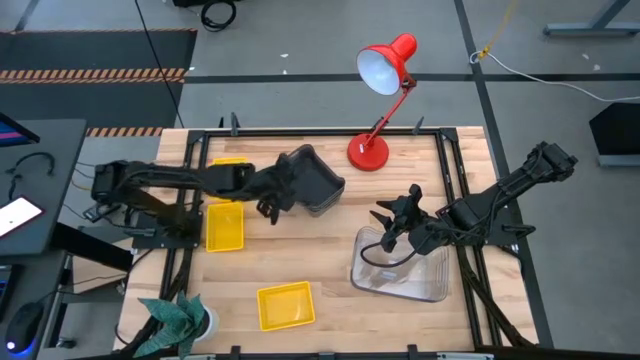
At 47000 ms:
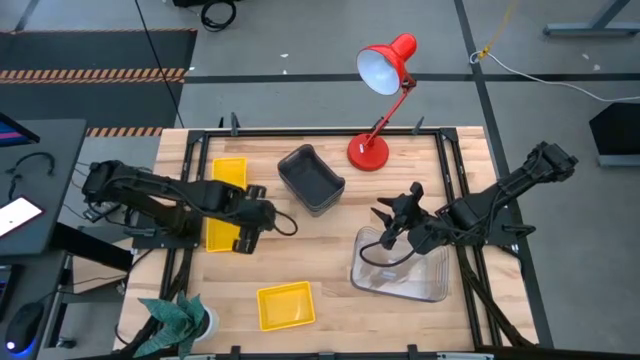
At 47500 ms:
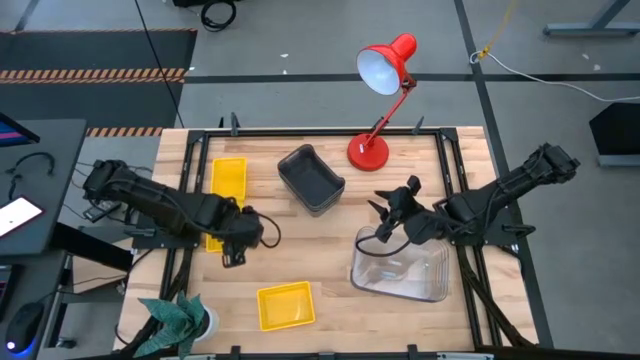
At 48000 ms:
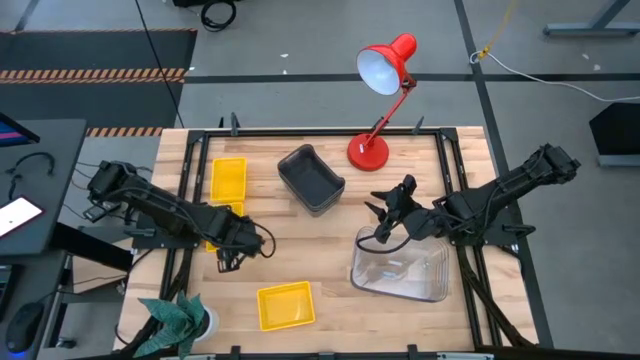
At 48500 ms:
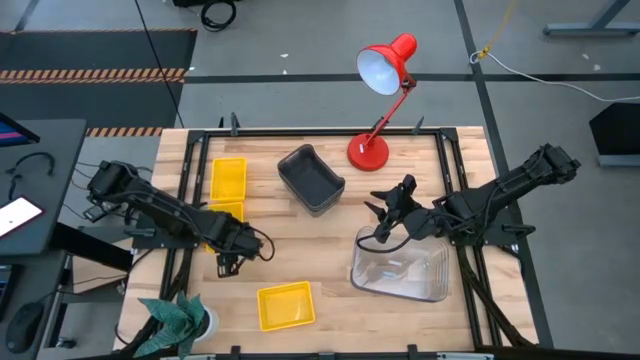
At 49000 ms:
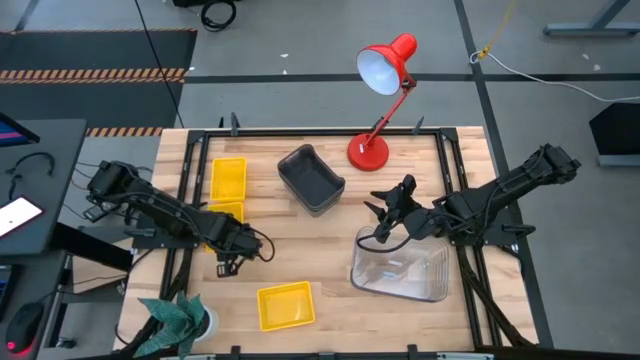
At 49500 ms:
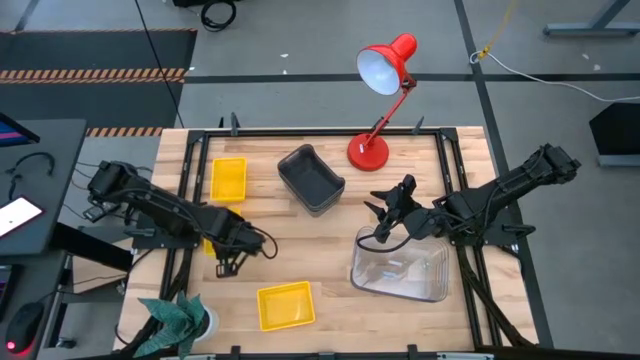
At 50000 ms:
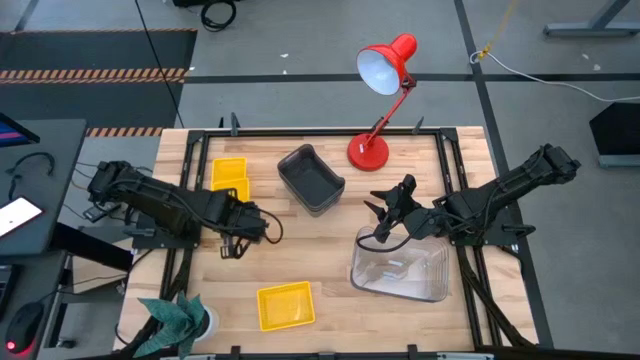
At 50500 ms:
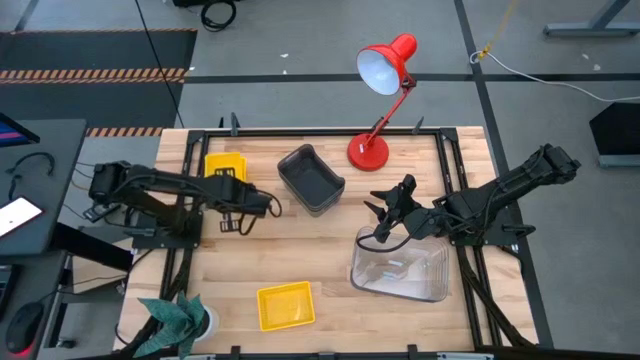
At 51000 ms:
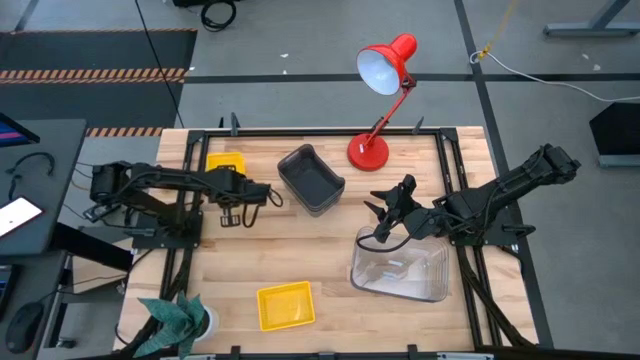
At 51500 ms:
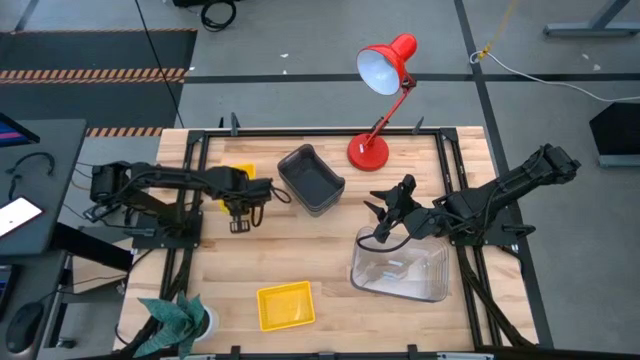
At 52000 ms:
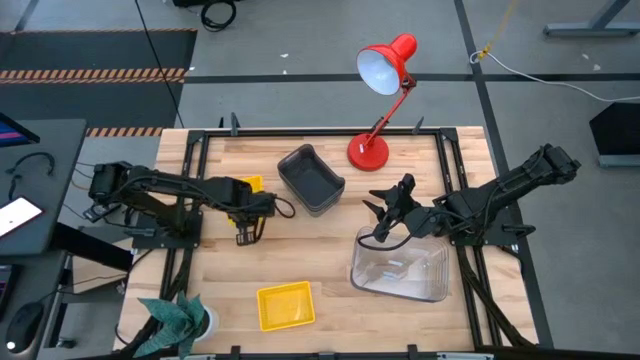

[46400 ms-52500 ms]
Stack the middle yellow bin on the top yellow bin

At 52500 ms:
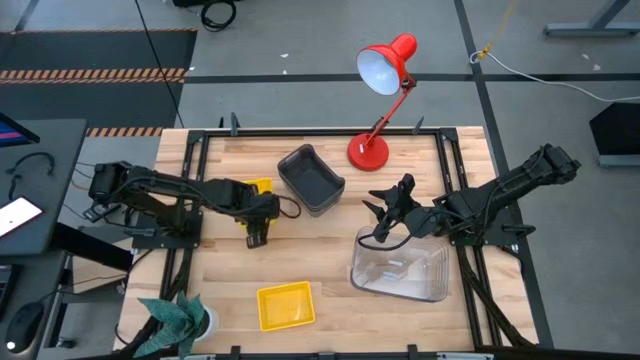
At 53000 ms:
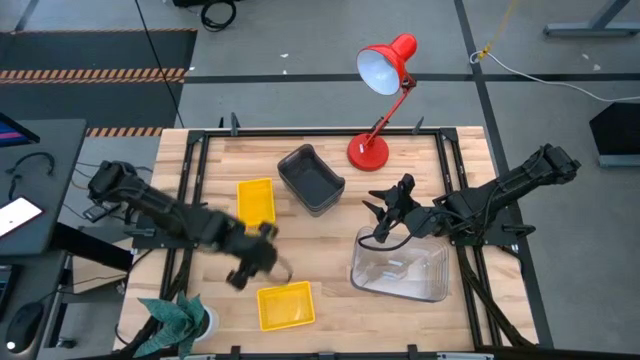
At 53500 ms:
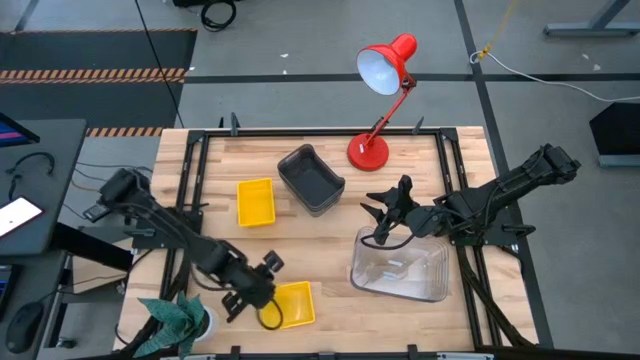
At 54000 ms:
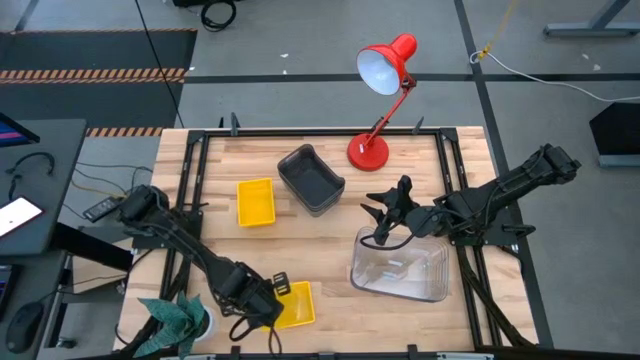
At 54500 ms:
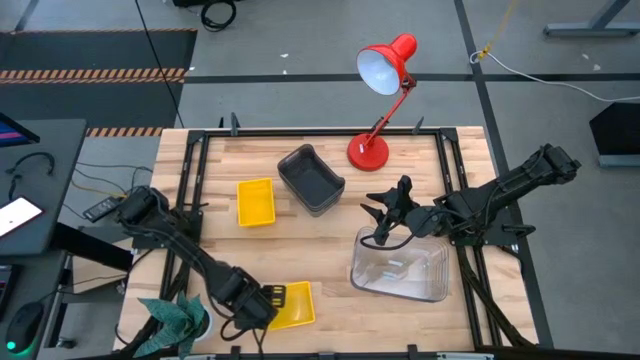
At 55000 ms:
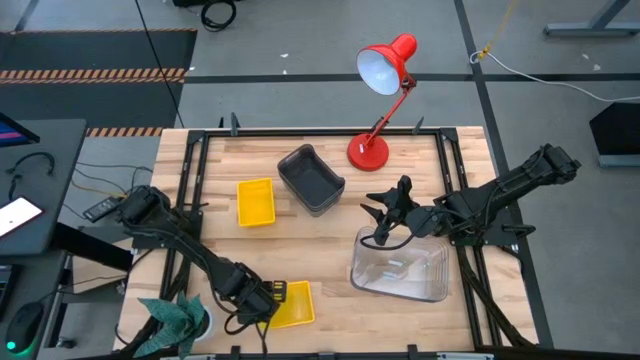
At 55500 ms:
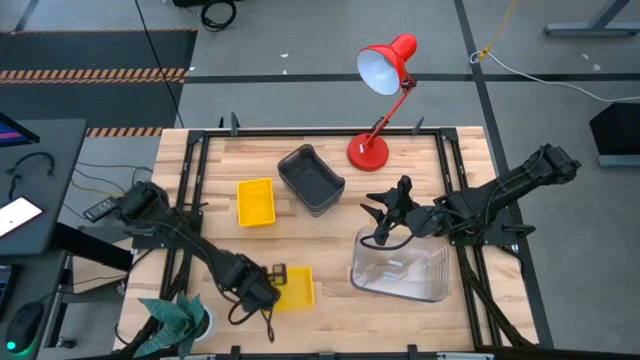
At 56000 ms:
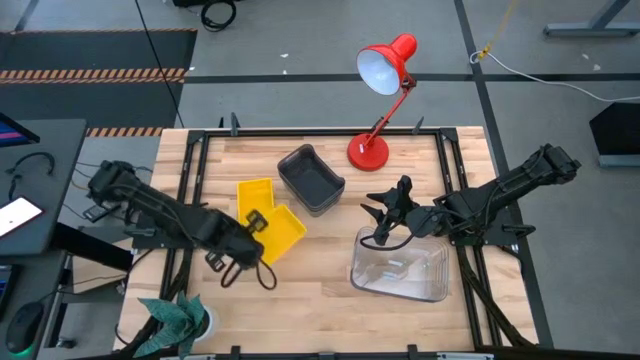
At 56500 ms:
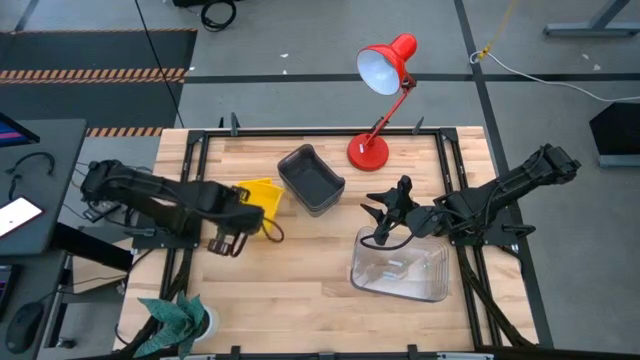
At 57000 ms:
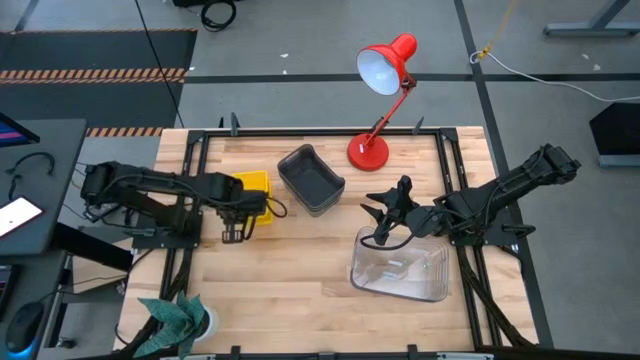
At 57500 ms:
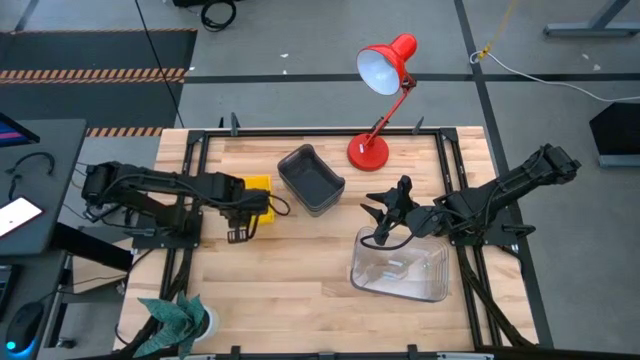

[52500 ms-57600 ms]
Stack the yellow bin on the stacked yellow bins

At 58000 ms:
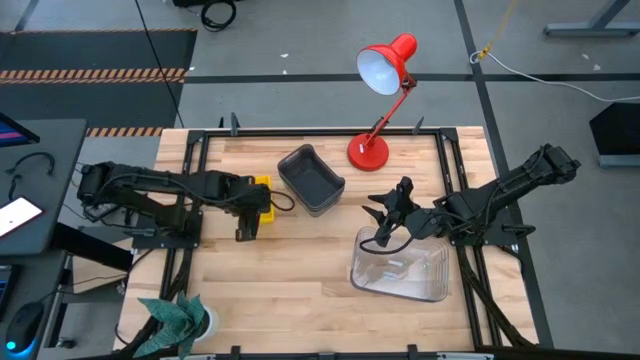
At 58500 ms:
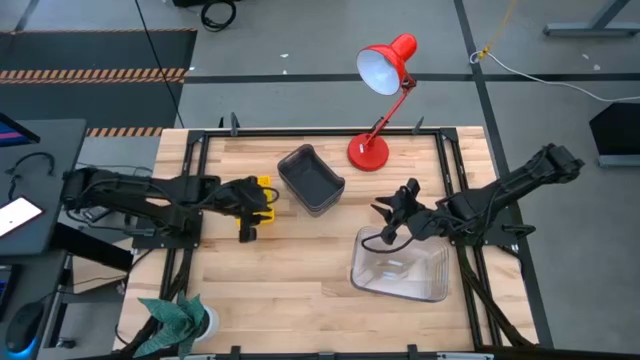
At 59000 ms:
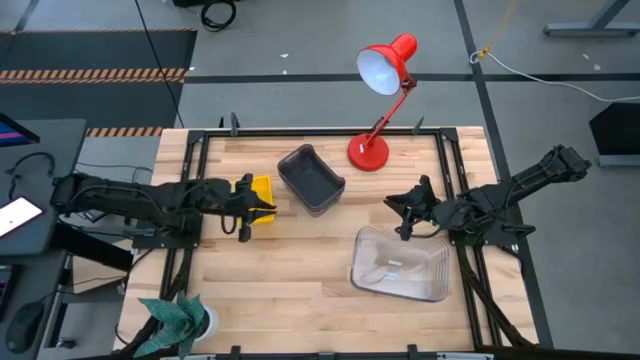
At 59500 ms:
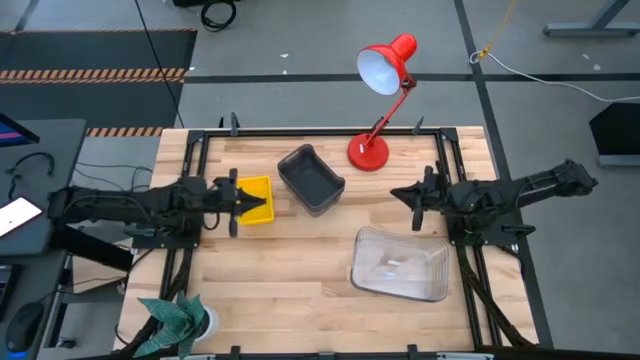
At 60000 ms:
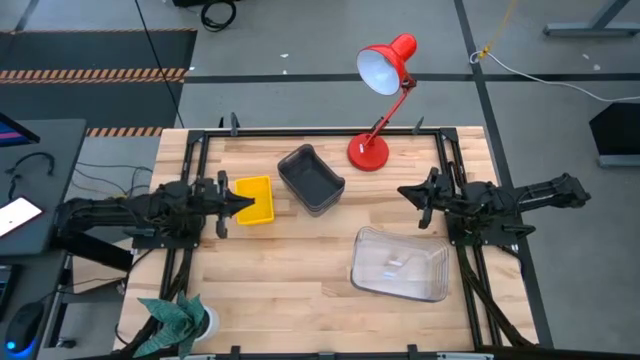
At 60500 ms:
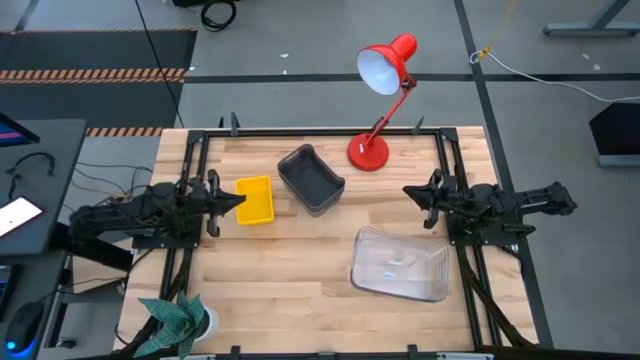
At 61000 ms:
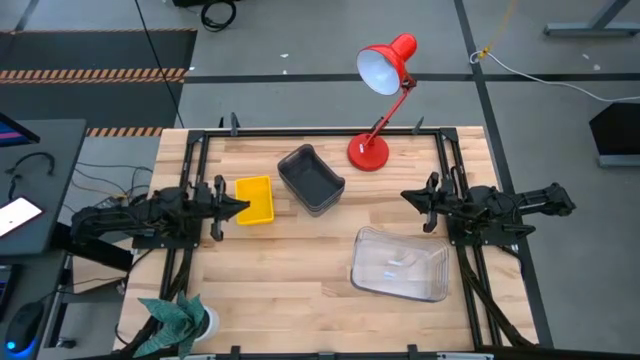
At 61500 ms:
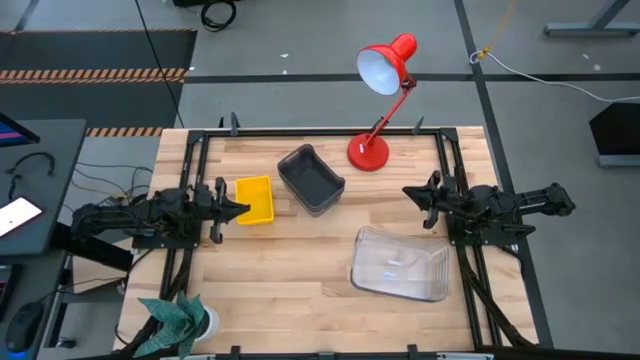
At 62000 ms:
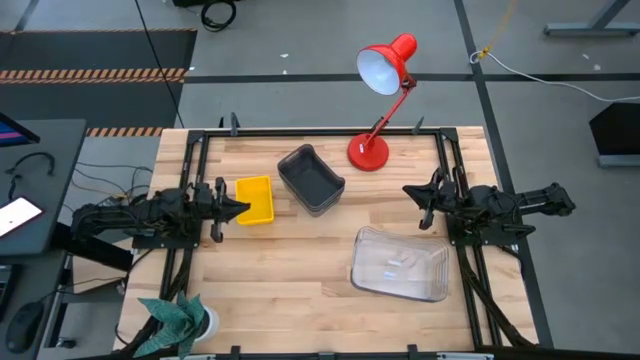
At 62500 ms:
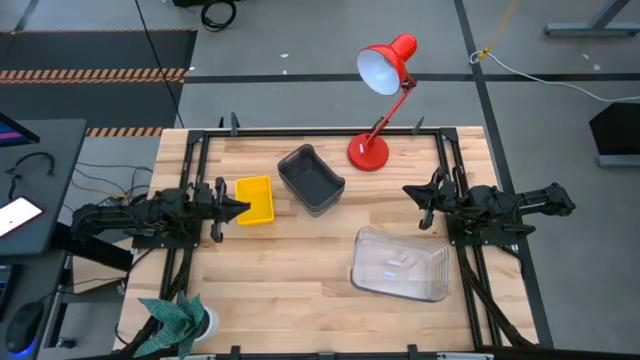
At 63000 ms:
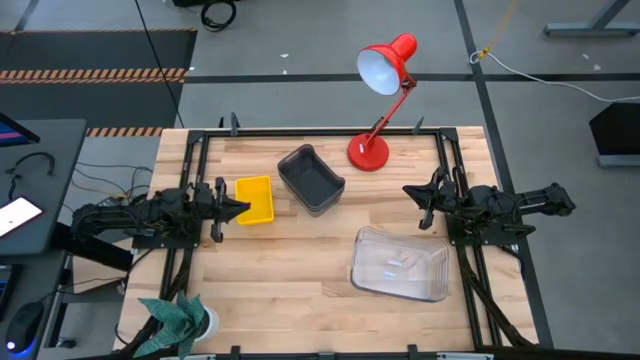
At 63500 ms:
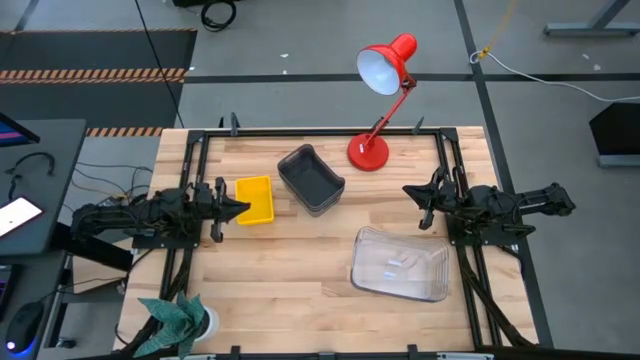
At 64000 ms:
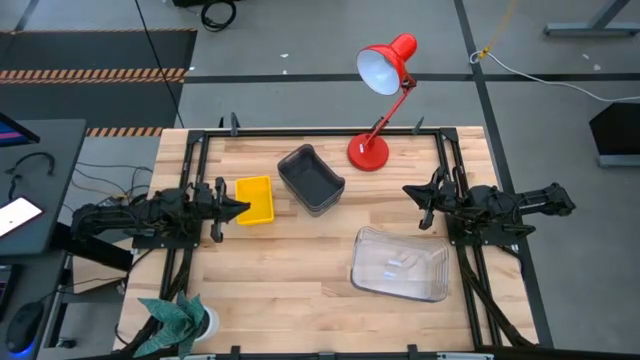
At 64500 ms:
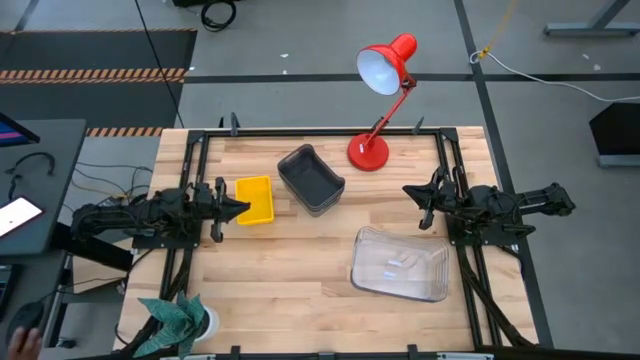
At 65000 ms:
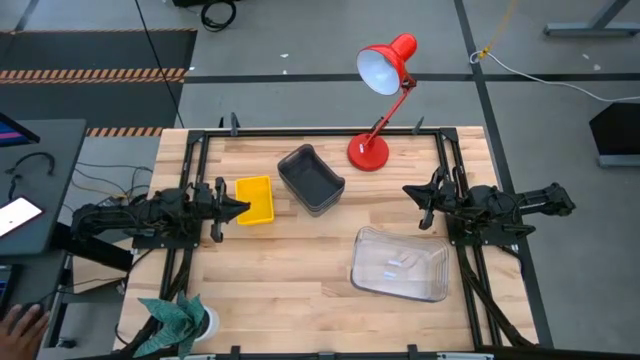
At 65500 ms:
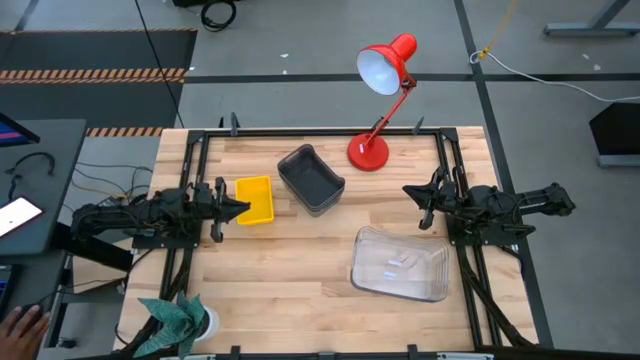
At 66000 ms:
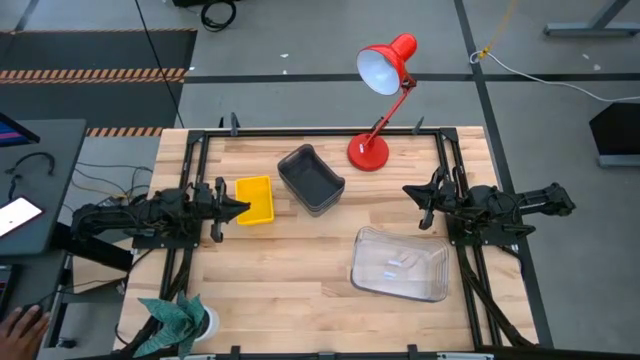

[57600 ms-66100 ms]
Return to Home Position
